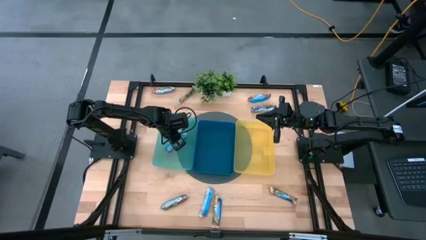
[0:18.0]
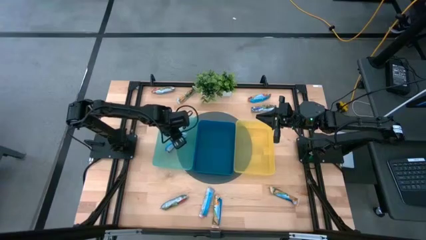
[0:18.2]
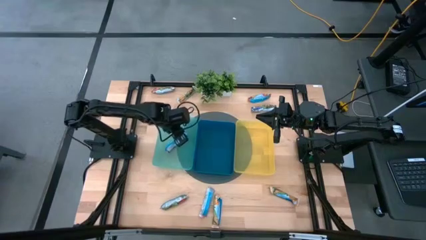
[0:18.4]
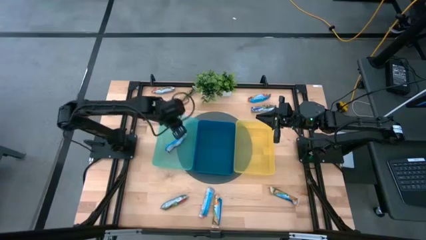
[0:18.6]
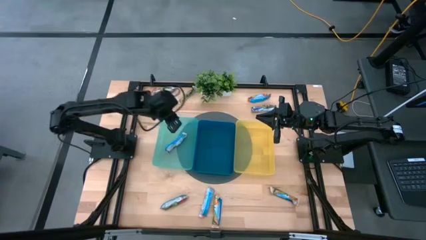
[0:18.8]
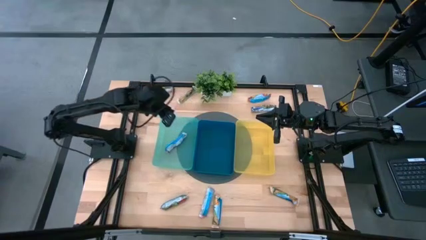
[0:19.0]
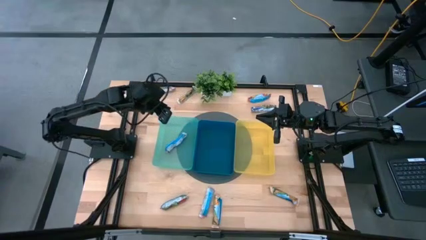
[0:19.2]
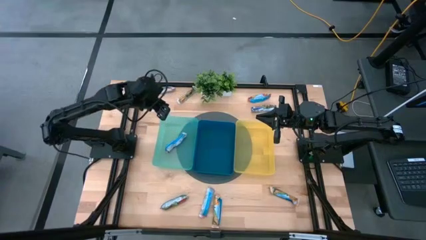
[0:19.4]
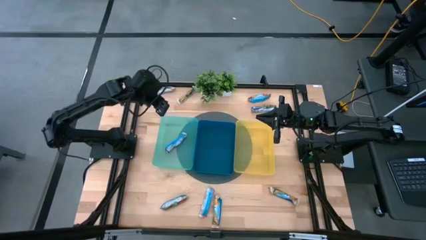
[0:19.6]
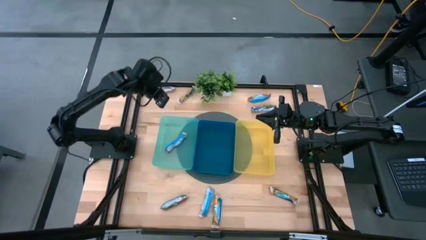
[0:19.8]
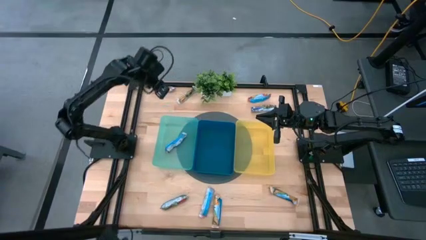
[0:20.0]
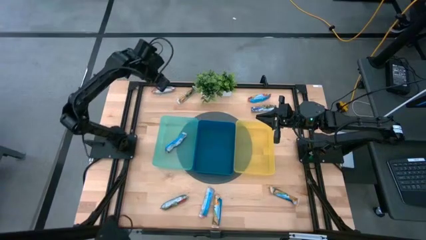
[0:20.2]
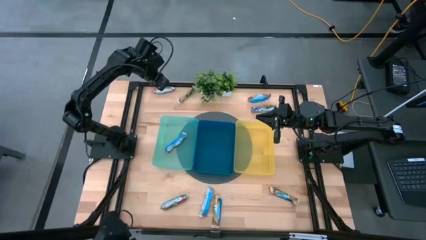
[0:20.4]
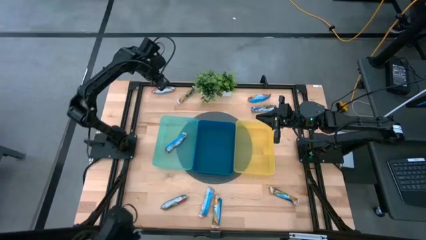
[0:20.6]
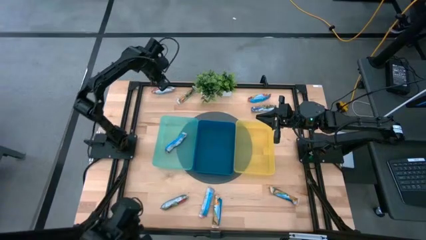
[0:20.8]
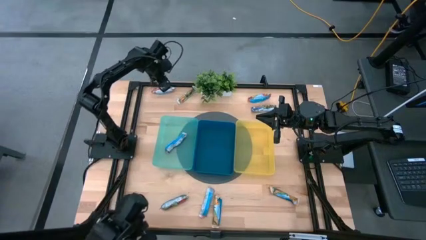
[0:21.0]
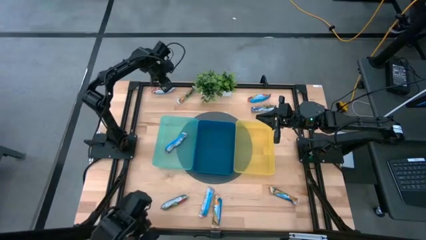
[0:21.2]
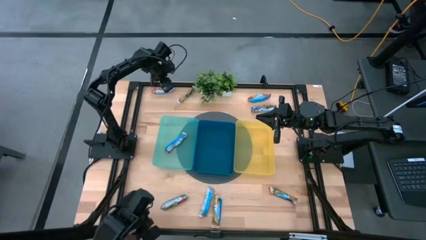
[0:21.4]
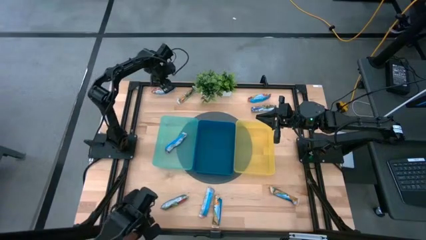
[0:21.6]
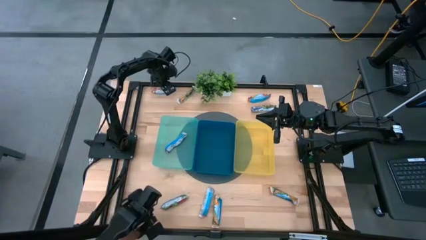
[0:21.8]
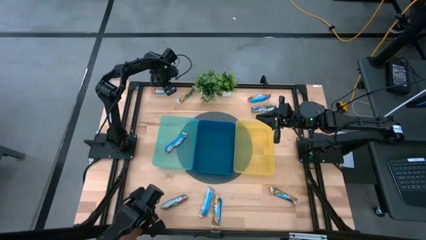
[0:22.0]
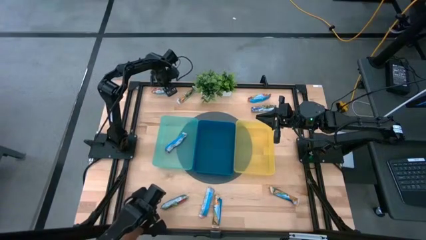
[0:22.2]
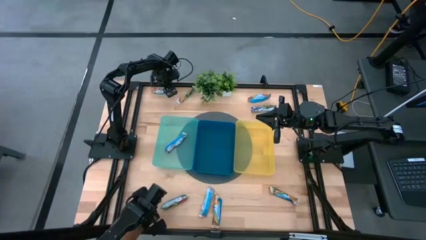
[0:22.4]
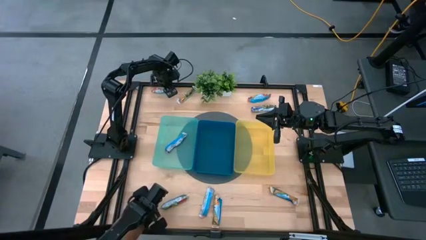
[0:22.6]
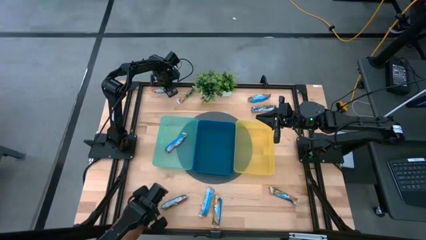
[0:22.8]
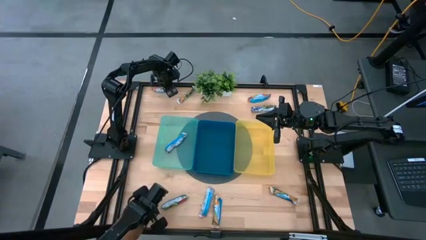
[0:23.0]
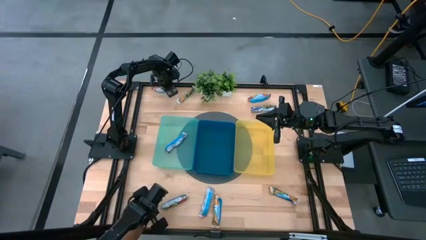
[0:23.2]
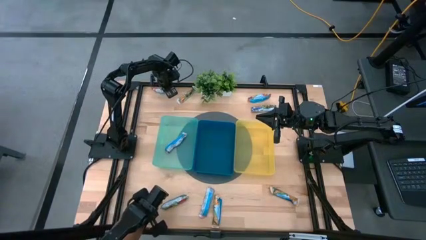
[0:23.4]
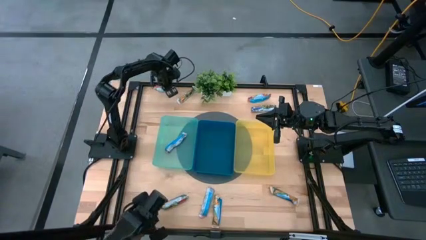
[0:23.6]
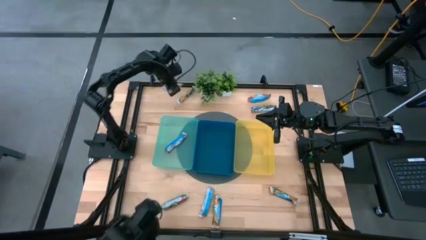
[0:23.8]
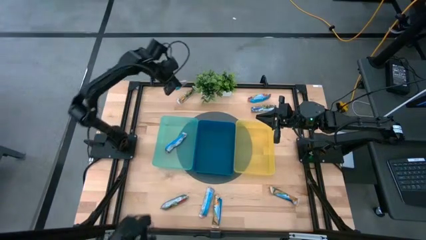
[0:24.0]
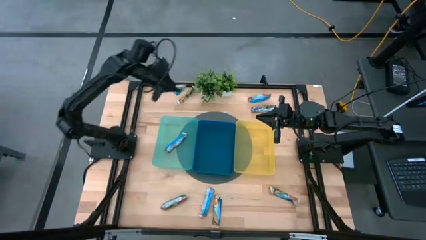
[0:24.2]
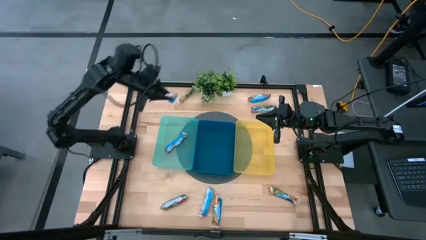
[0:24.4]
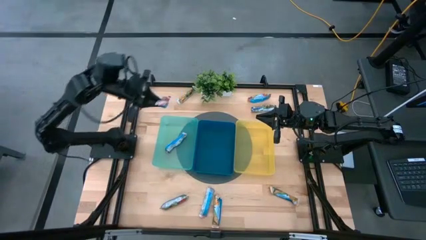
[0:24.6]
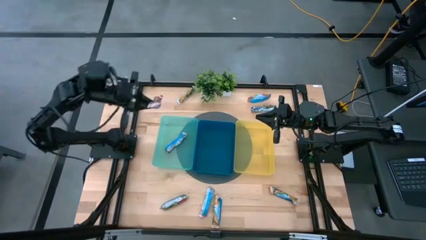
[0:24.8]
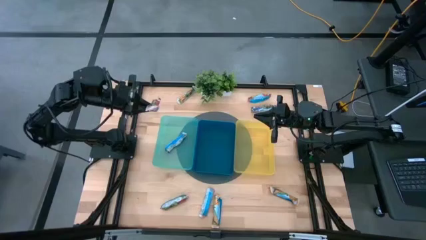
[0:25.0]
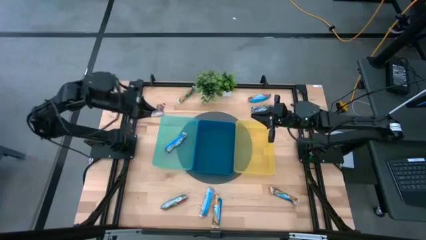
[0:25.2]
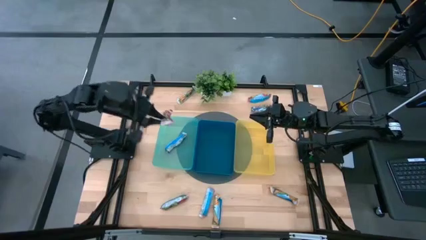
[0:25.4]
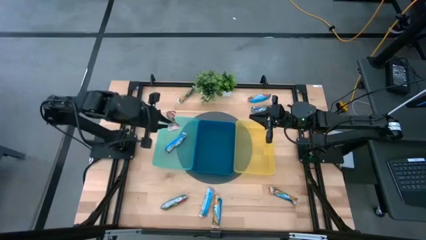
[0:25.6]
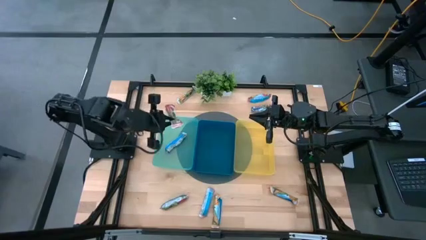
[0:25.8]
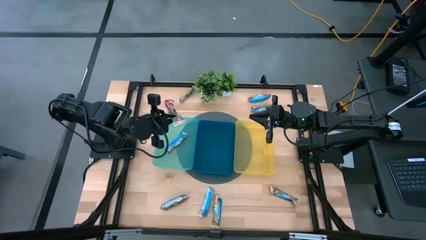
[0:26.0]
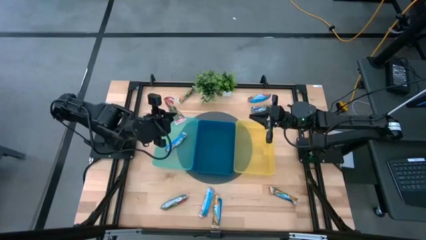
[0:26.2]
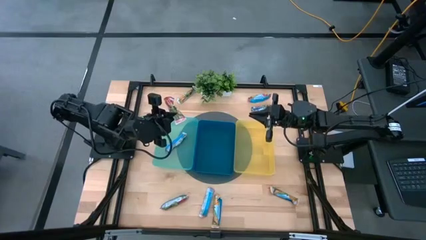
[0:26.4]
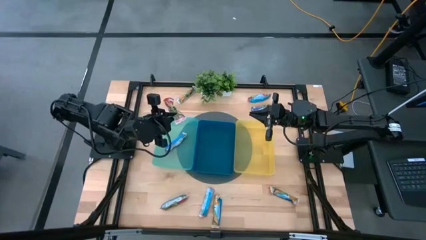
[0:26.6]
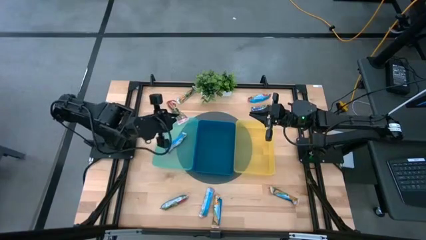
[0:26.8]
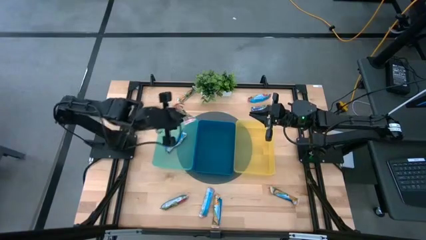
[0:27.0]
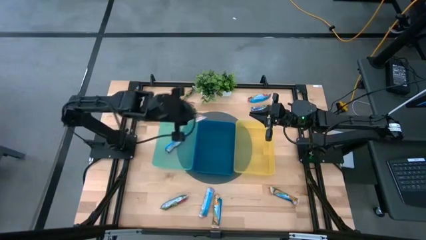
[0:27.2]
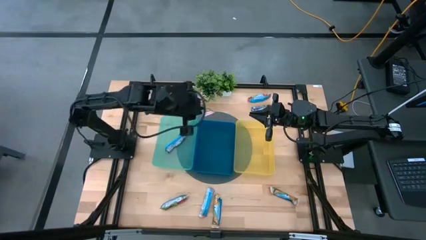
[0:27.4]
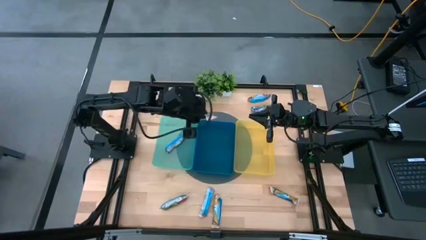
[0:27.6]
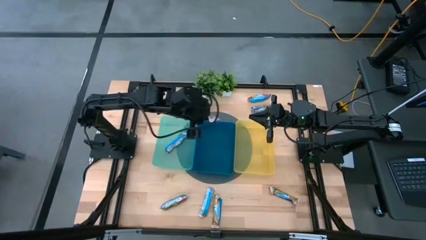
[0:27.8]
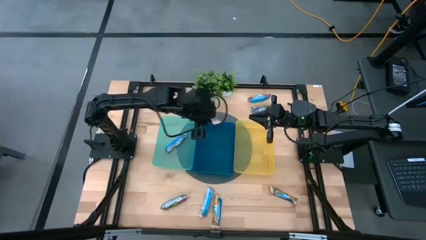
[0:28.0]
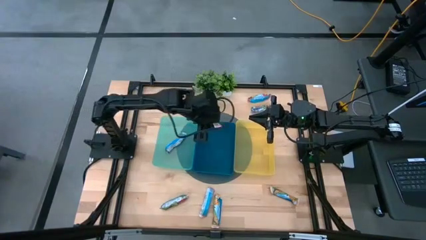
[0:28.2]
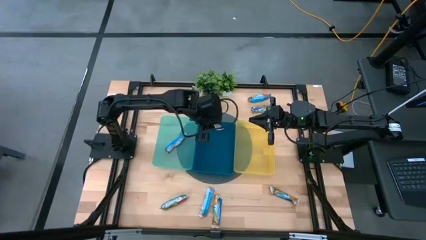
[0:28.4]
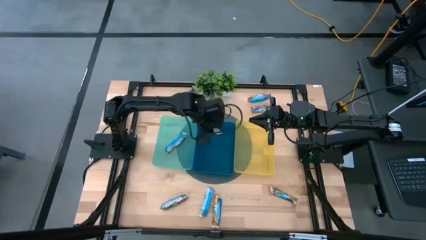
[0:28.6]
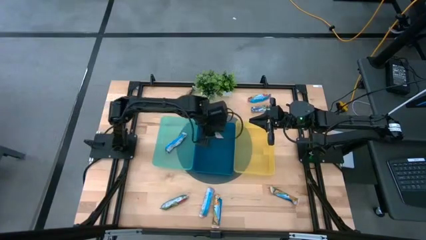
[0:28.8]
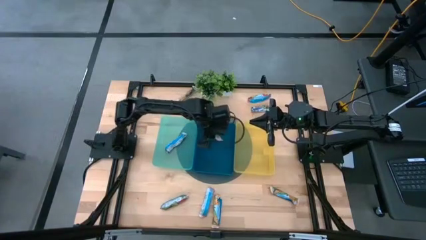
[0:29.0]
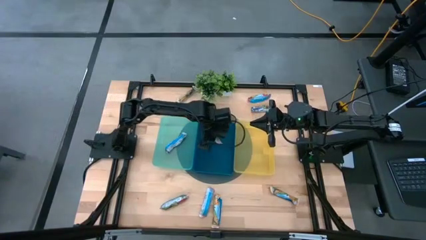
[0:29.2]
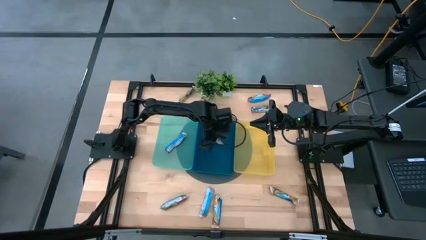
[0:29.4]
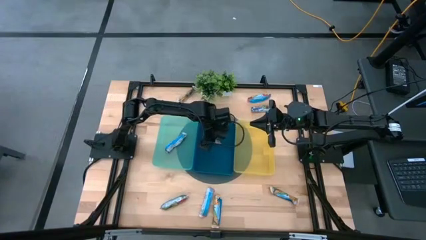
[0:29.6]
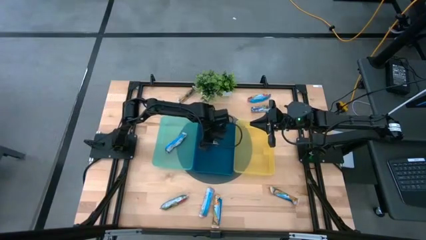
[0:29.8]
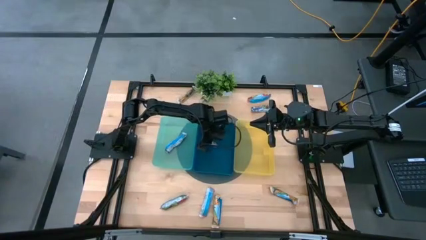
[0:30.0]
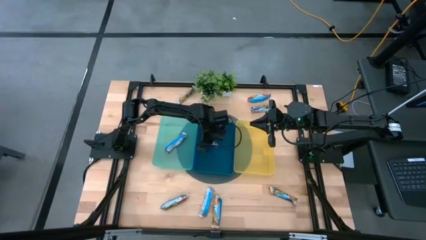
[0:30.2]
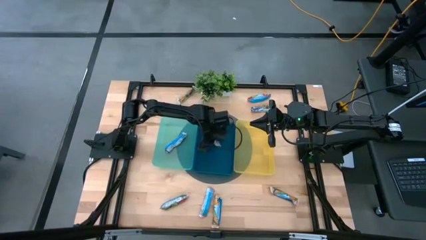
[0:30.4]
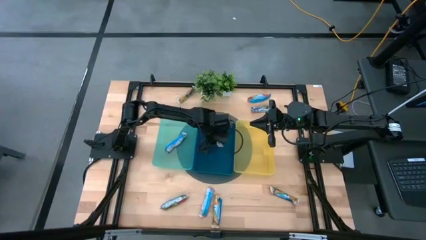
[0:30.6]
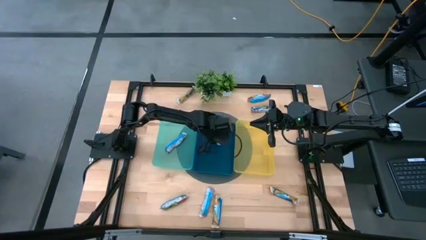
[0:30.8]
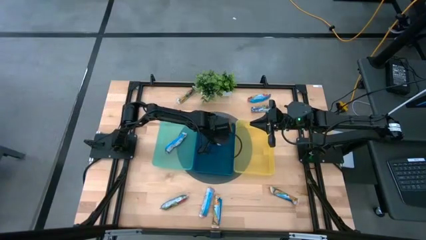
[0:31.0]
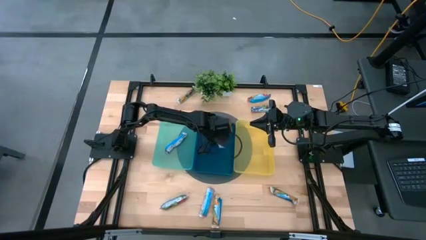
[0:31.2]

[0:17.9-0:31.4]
Task: Pick and place Granola Bars by type
Put the red granola bar into the blue bin
